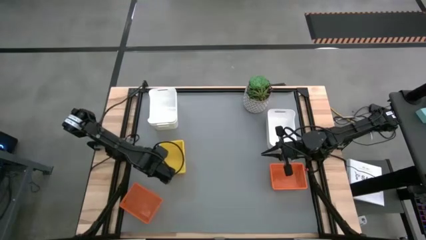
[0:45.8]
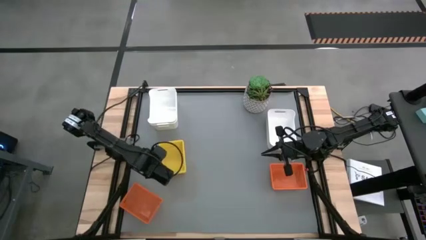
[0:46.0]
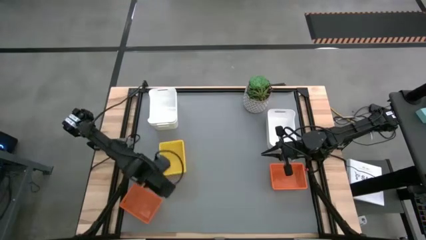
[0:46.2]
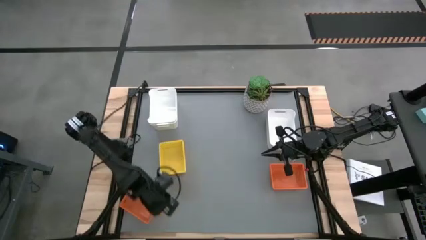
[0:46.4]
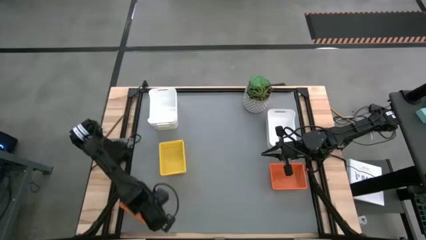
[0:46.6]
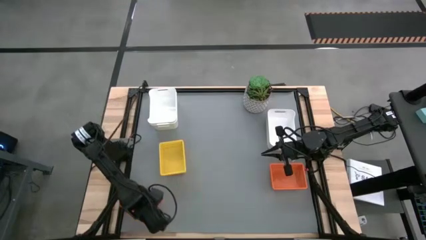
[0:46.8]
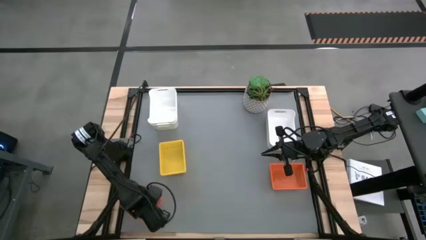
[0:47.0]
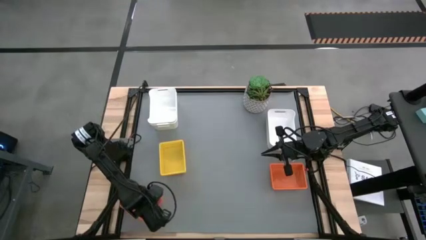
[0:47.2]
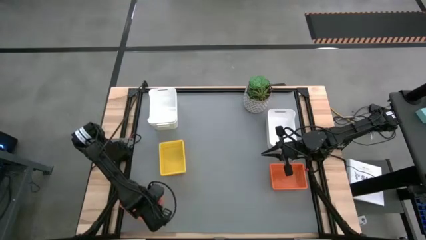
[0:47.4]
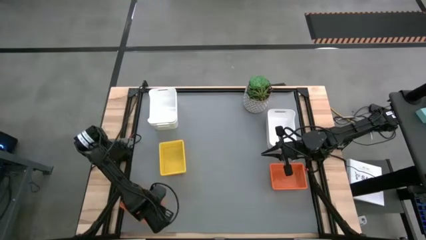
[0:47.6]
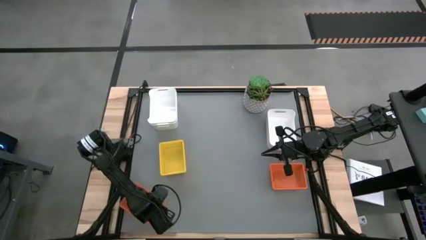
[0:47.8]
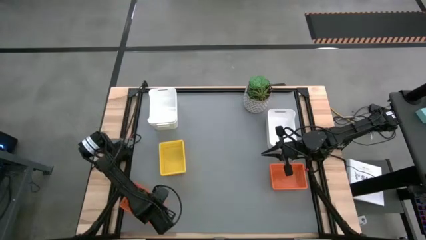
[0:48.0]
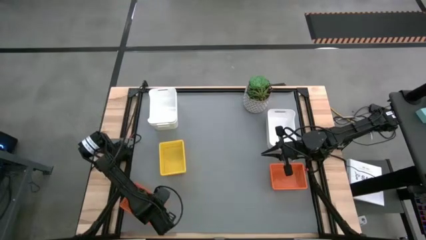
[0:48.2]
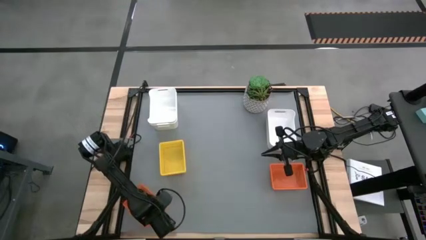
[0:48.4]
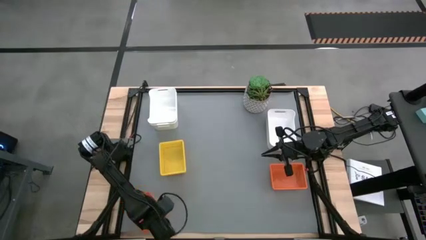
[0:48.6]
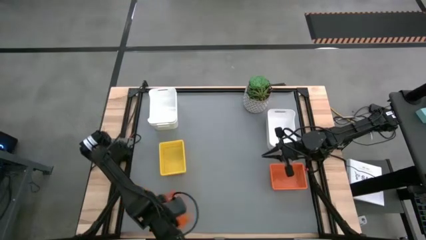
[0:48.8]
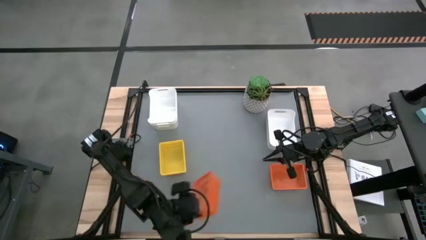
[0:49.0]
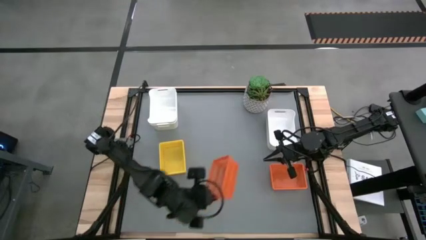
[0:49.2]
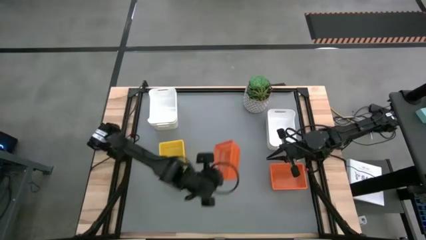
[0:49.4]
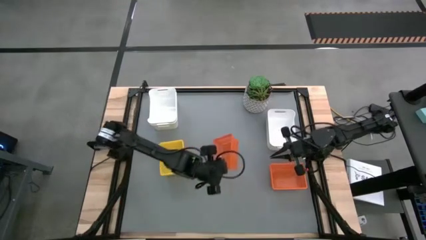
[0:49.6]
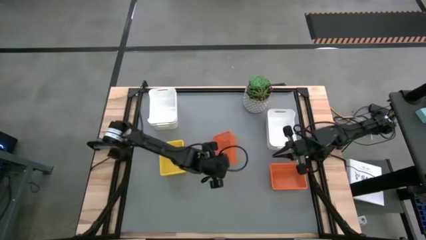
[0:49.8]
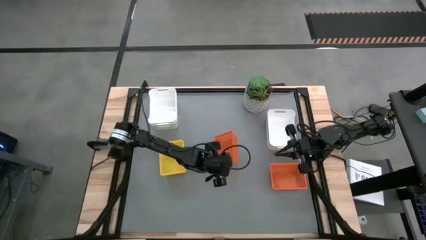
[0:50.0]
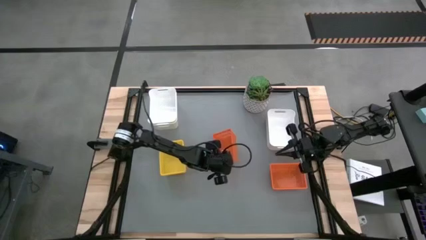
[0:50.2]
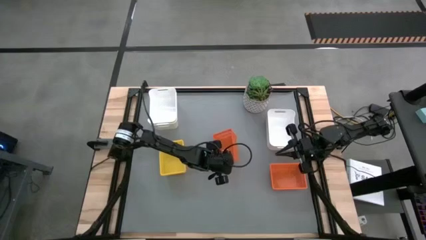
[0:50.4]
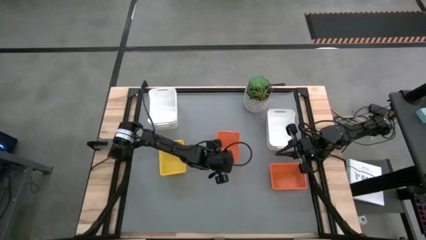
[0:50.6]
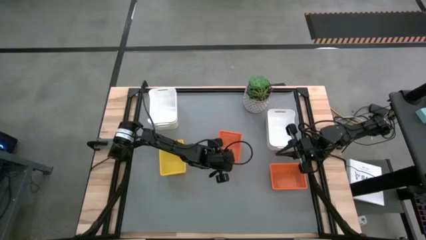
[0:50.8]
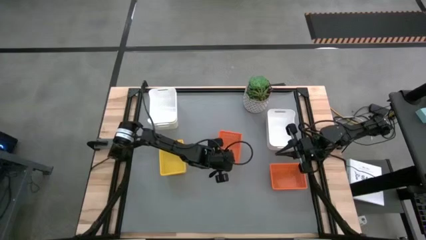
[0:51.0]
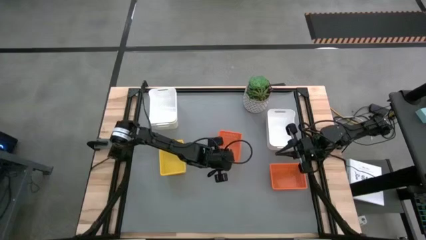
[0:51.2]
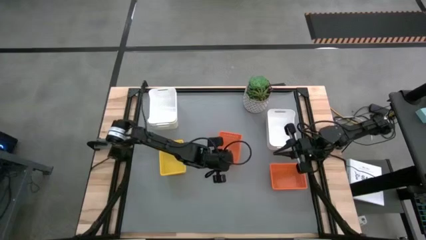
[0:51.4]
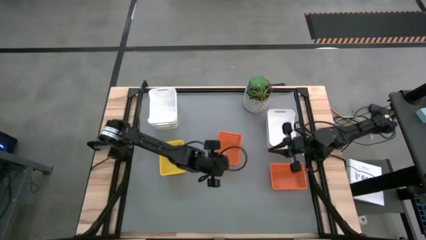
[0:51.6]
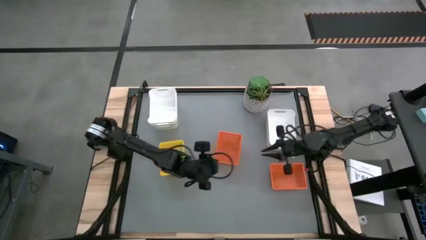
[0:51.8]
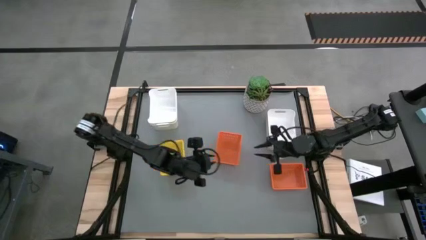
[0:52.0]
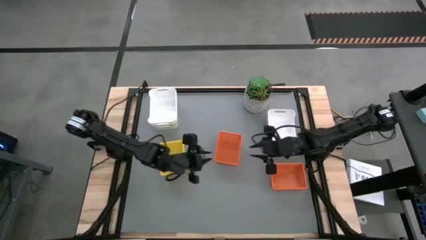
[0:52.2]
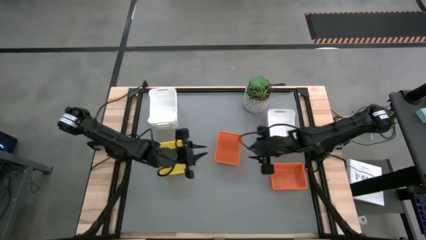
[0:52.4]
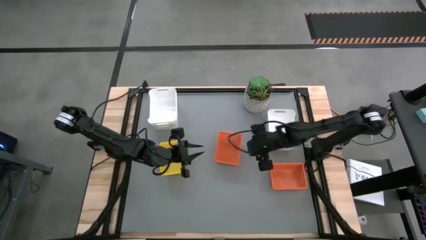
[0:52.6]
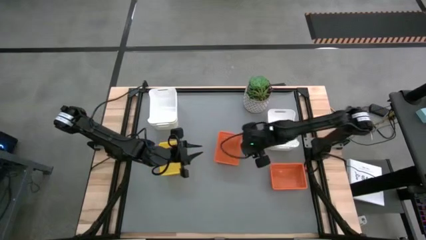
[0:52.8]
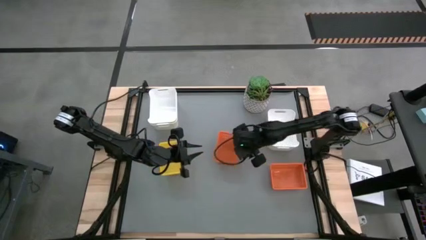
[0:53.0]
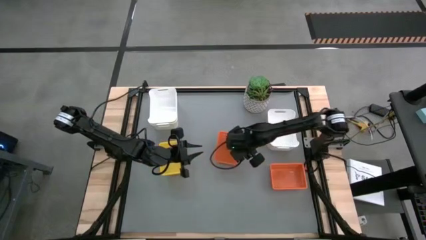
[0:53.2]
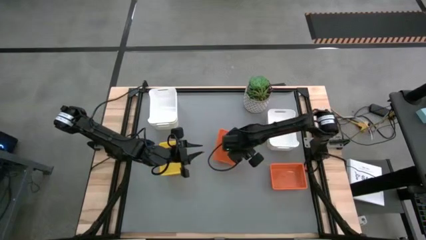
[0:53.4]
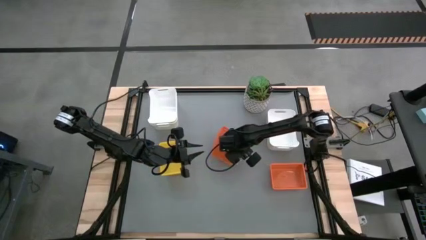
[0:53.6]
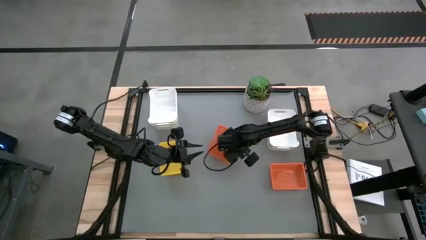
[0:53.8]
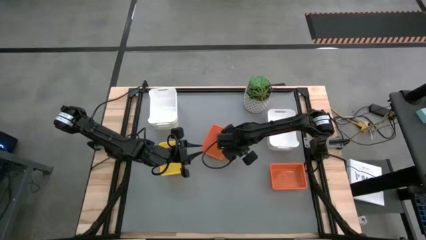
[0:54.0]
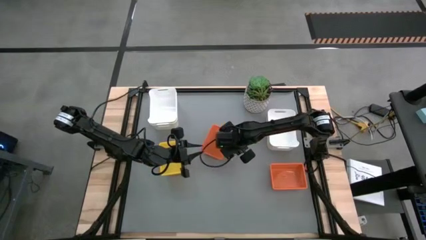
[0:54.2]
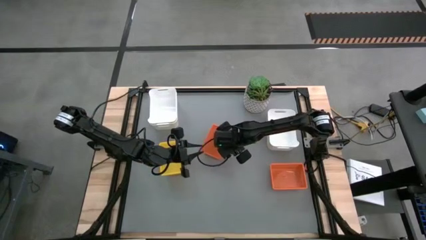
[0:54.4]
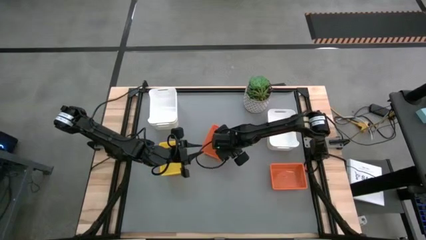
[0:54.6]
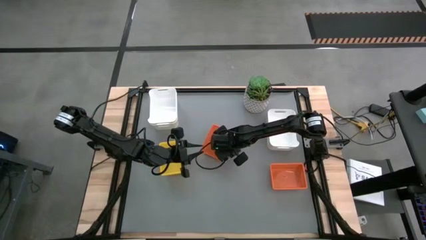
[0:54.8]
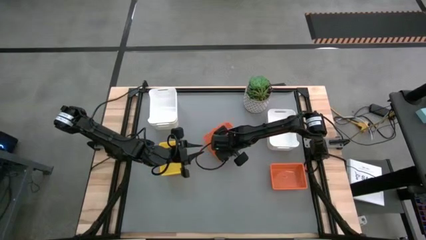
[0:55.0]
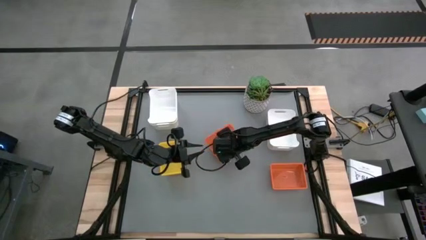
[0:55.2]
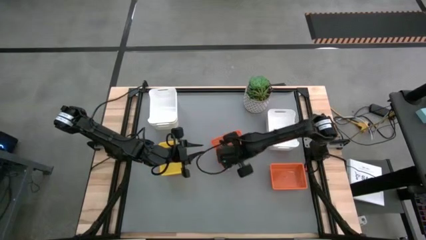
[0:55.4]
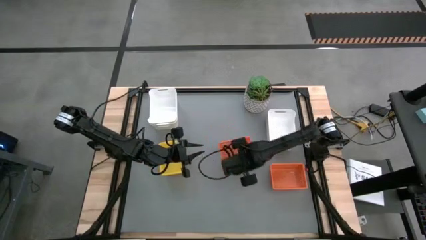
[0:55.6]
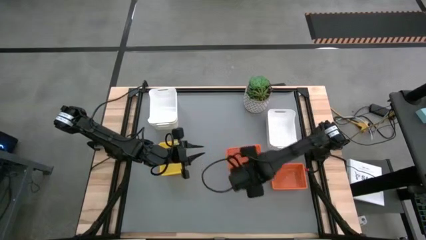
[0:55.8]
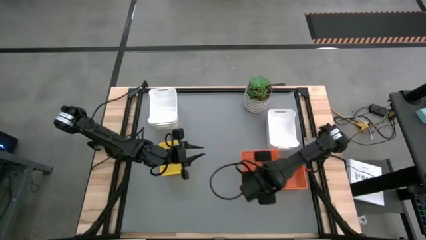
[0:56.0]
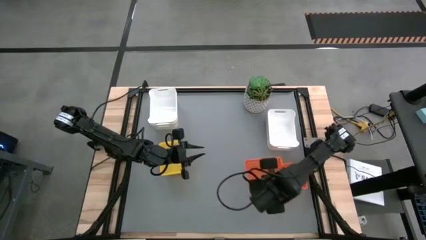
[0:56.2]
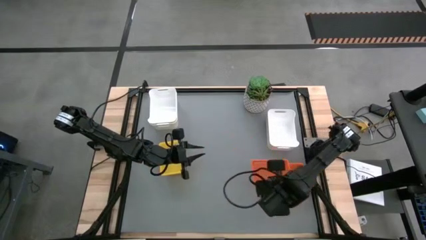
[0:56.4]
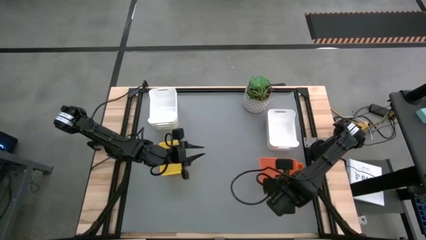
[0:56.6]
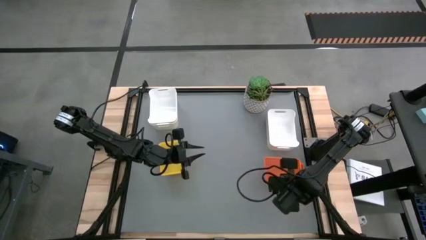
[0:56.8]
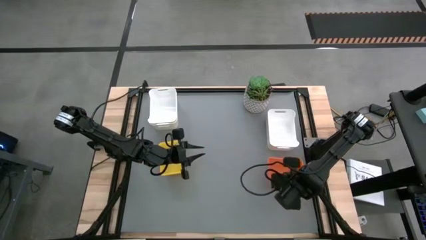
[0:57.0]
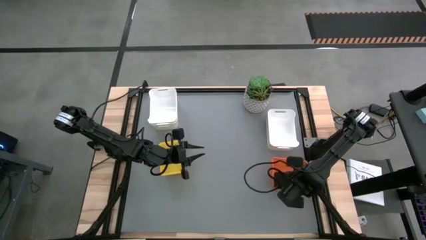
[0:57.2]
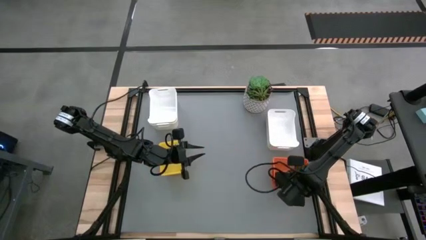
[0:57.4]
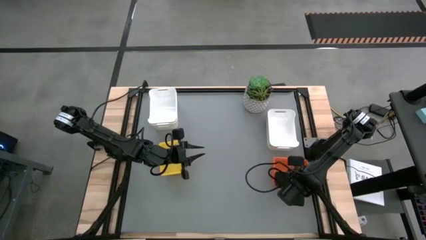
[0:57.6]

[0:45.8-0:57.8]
Stack the left orange bin on top of the right orange bin
